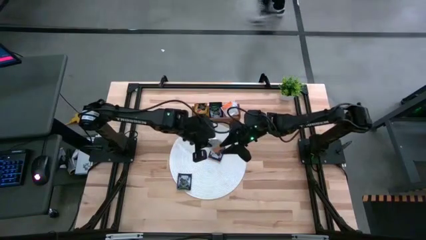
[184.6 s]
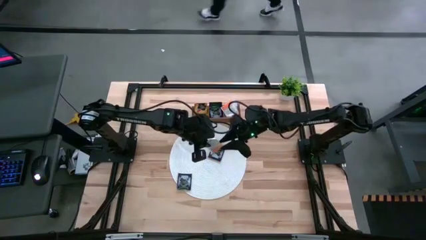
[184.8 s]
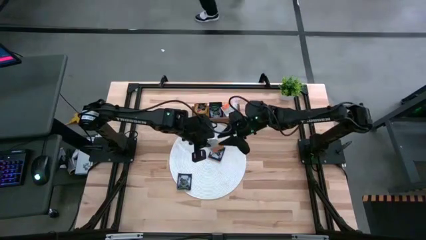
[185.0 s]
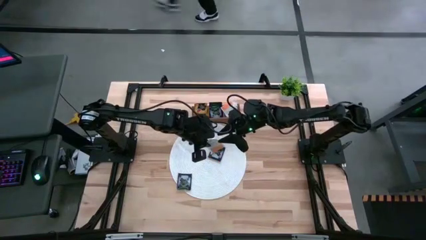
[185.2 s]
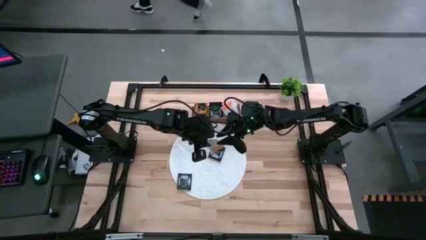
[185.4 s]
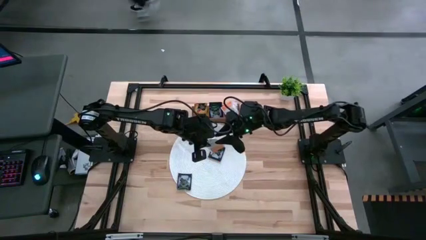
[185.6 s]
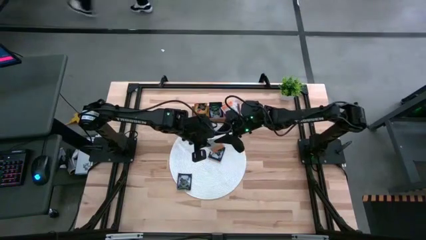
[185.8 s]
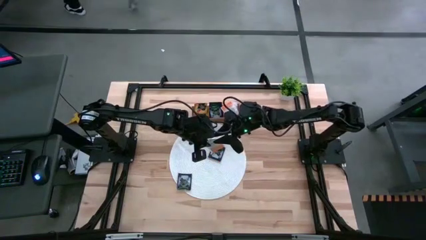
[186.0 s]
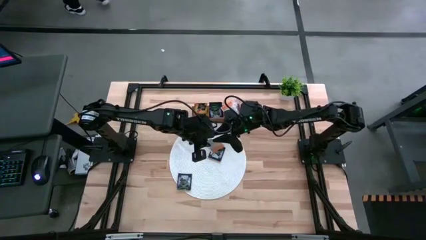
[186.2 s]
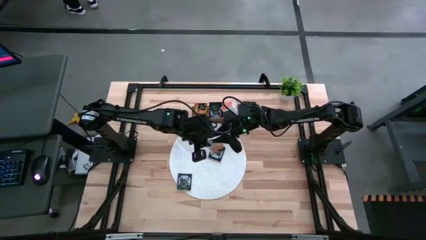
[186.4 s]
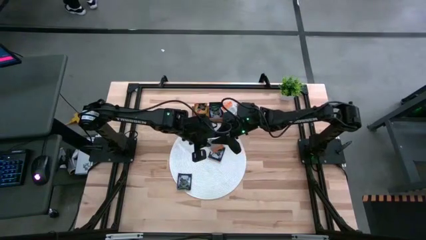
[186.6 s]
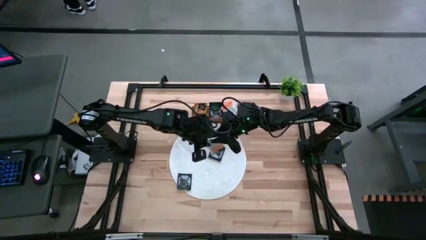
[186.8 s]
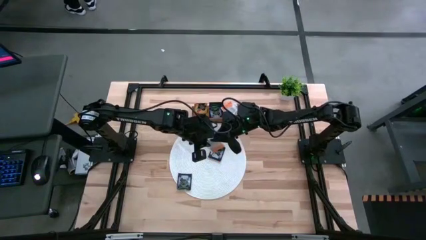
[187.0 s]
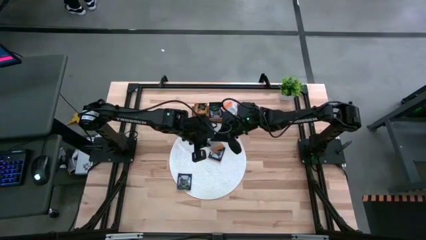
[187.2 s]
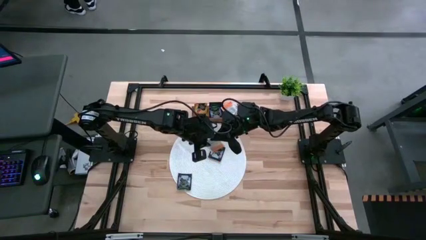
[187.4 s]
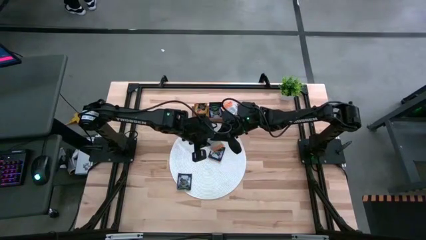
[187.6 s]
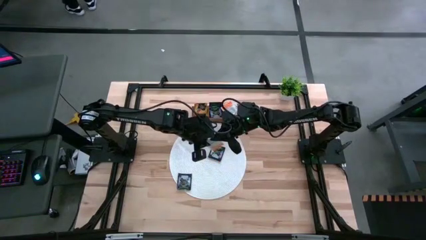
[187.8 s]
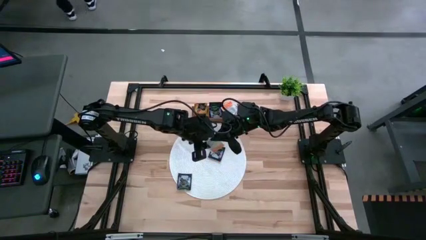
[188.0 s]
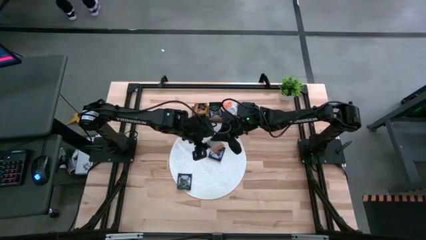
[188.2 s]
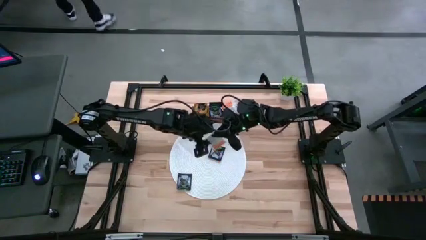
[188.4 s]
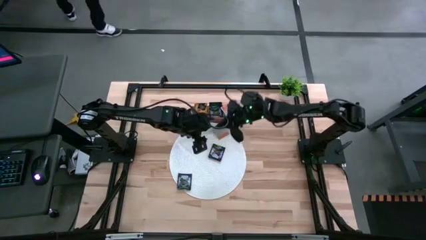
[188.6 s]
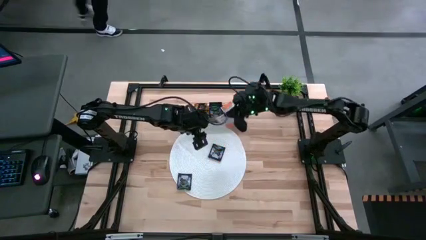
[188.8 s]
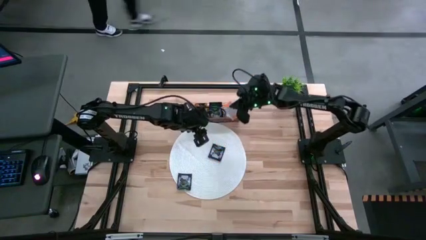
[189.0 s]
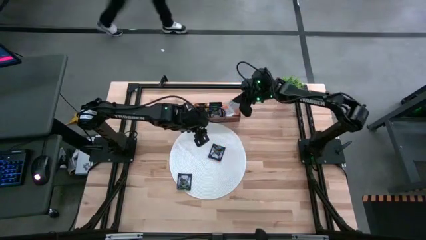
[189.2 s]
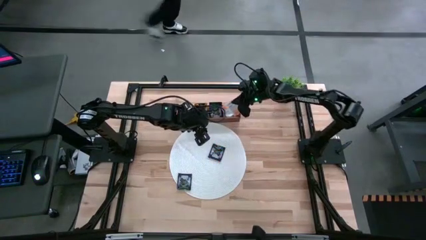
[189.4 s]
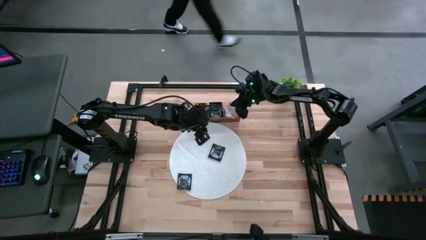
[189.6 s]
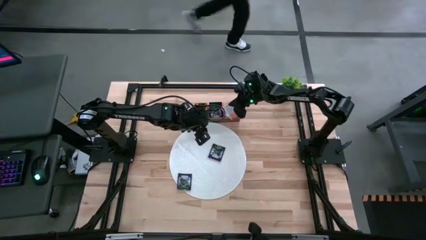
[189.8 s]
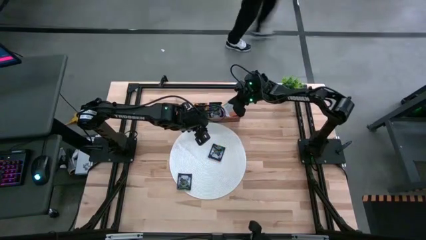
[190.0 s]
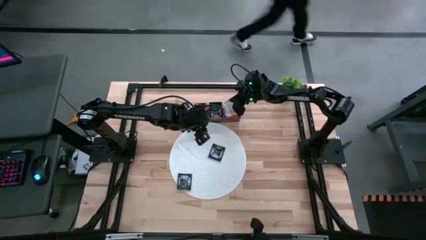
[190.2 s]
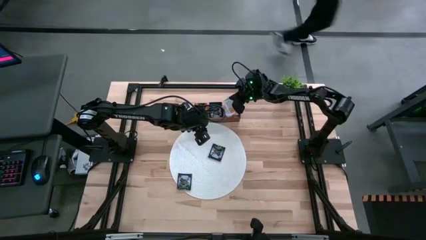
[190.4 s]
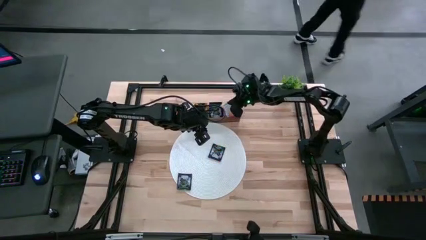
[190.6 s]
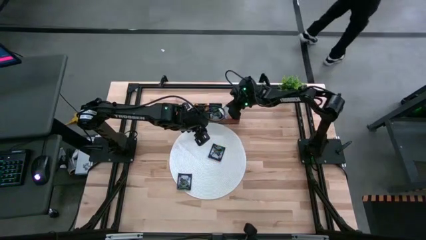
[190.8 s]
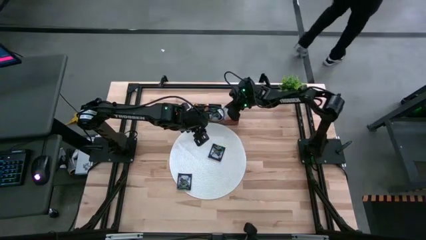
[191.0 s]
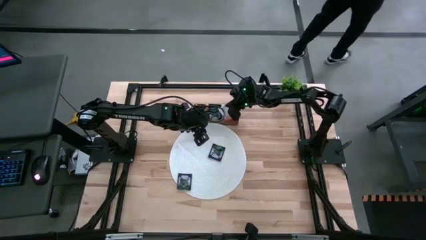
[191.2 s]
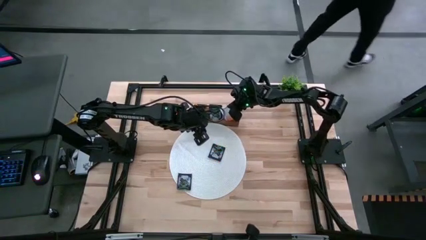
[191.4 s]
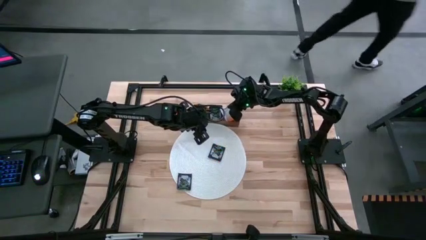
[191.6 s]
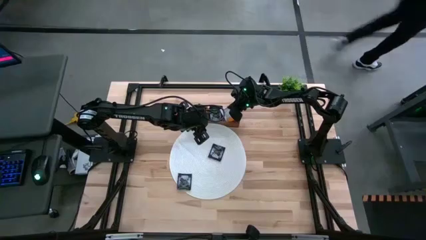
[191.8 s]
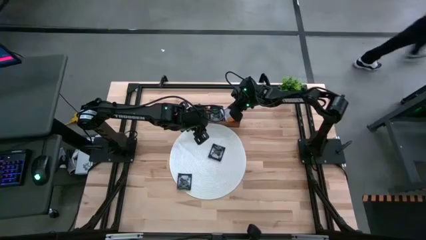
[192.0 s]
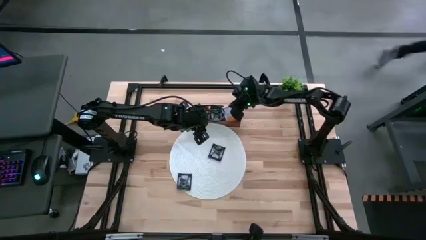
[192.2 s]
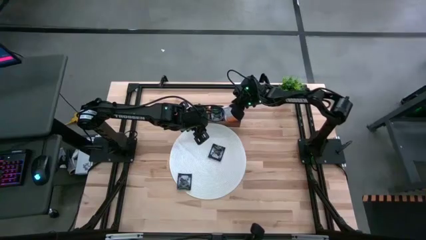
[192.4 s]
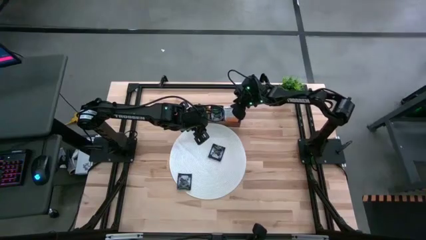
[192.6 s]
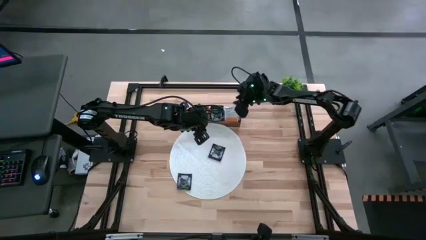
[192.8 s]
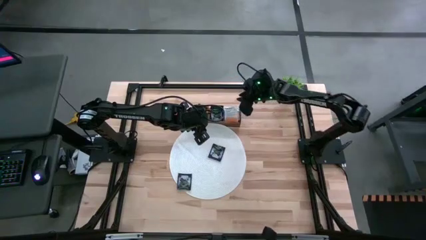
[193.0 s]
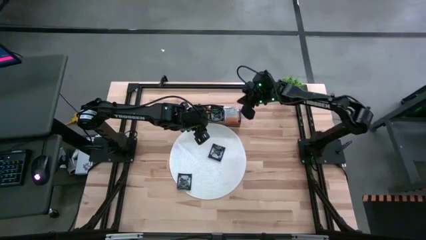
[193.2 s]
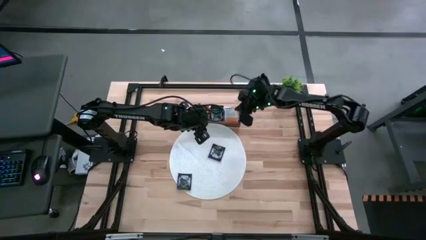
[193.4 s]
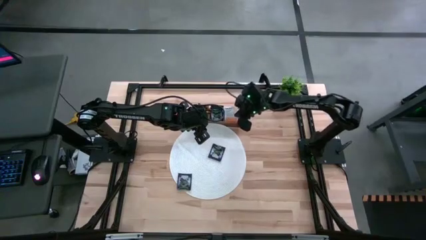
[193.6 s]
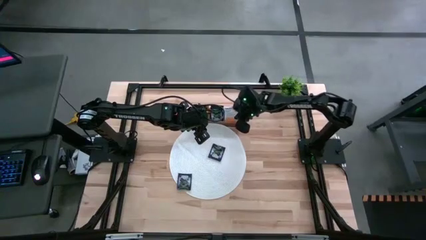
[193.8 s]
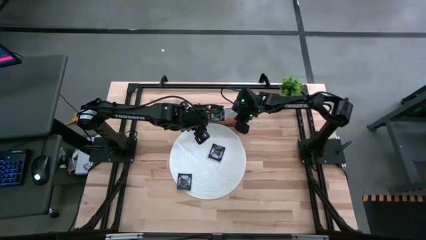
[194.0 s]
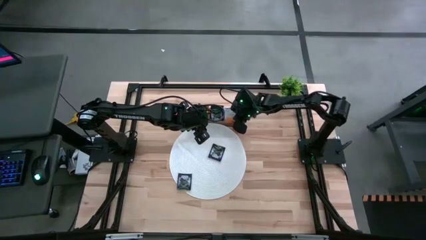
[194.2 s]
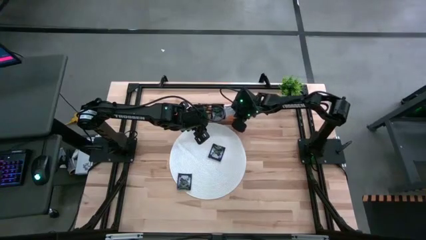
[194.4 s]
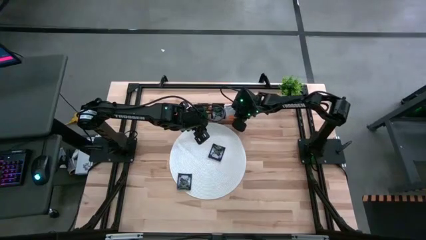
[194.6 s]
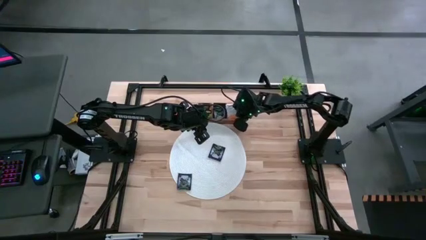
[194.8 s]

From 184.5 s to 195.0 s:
Task: Pick & Place Tea
Put the white tea bag into the right section of the wooden organizer
